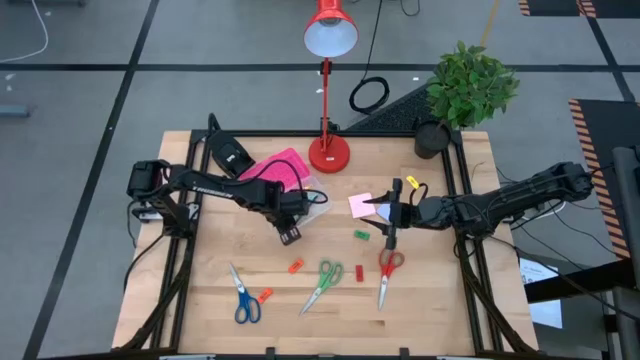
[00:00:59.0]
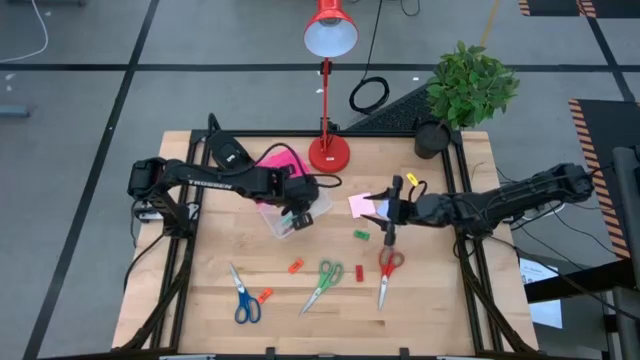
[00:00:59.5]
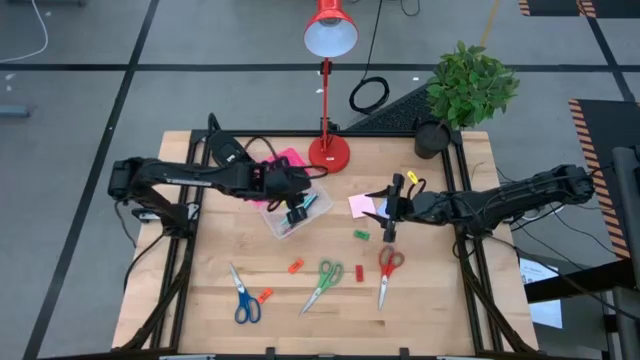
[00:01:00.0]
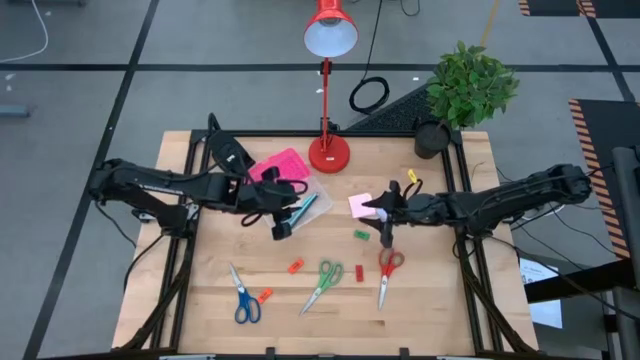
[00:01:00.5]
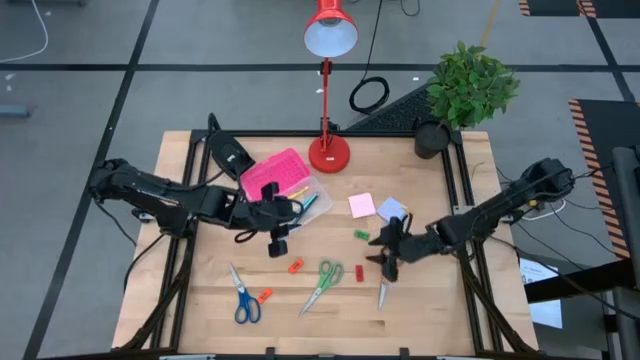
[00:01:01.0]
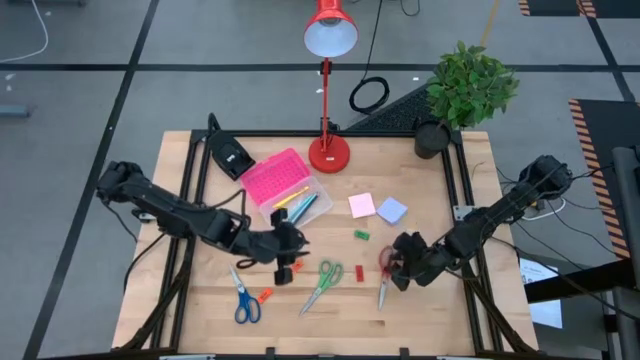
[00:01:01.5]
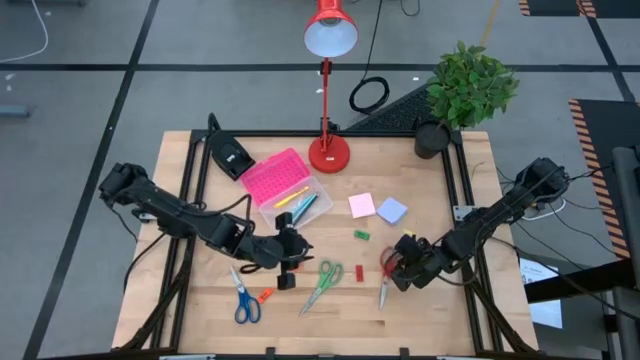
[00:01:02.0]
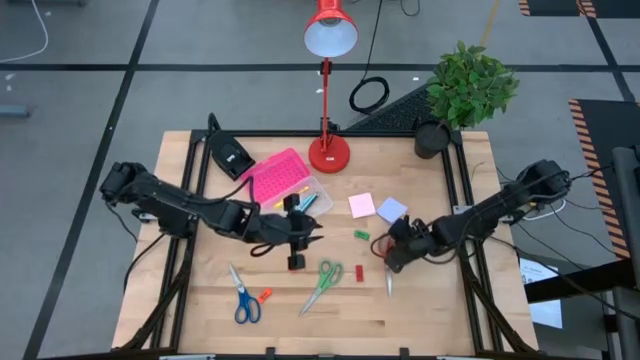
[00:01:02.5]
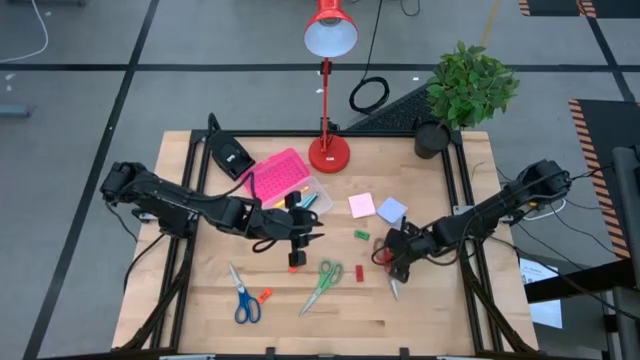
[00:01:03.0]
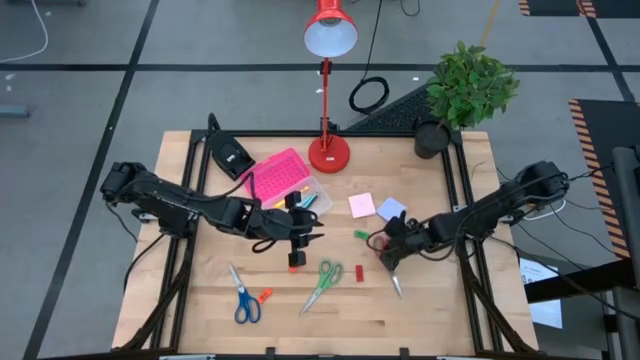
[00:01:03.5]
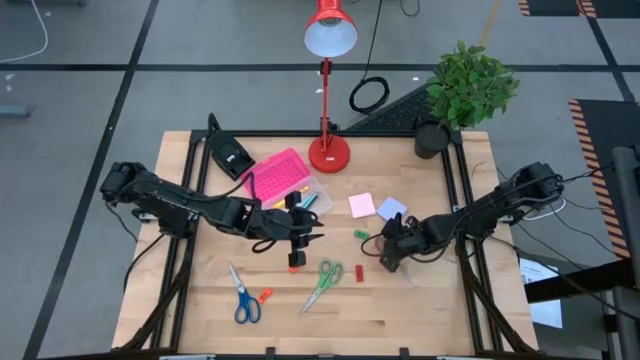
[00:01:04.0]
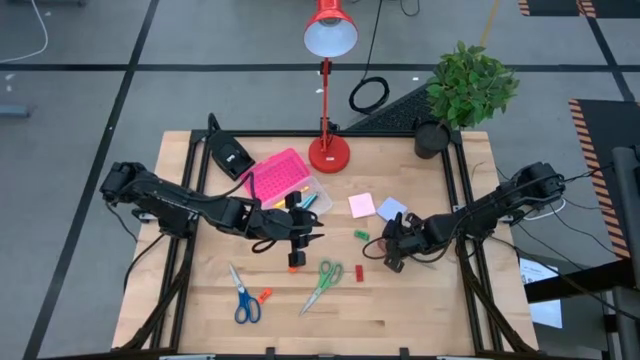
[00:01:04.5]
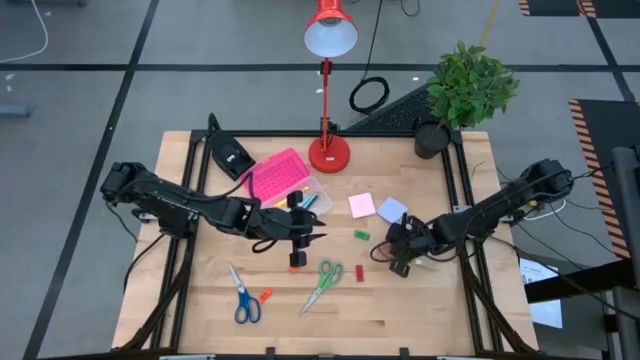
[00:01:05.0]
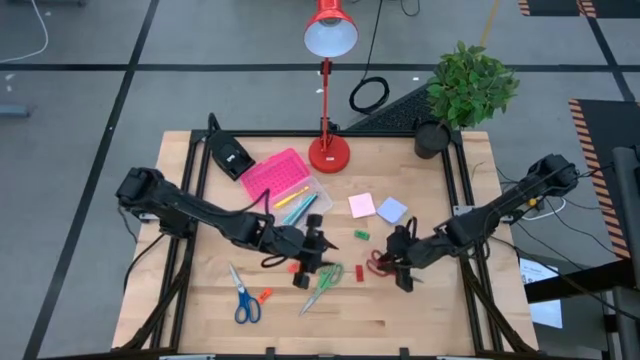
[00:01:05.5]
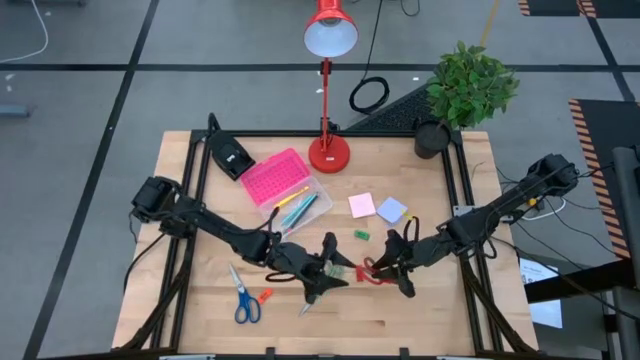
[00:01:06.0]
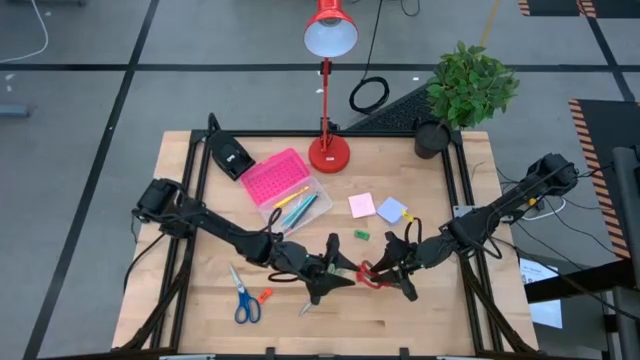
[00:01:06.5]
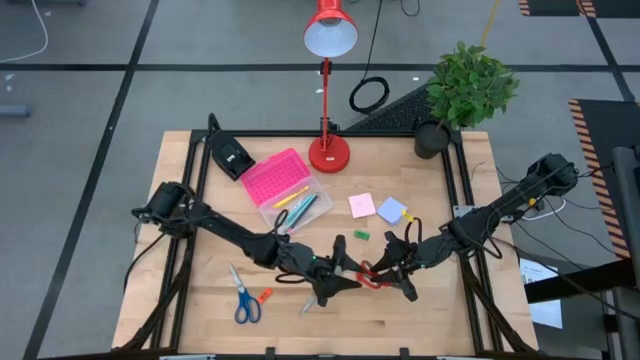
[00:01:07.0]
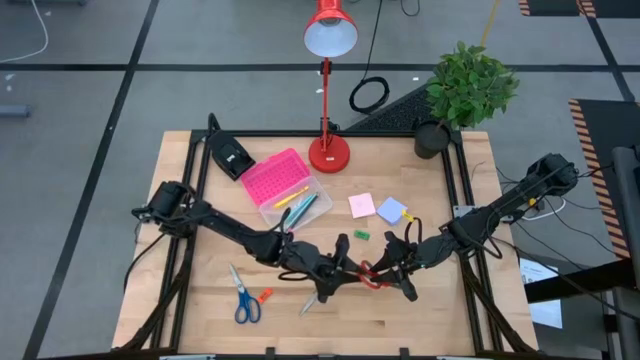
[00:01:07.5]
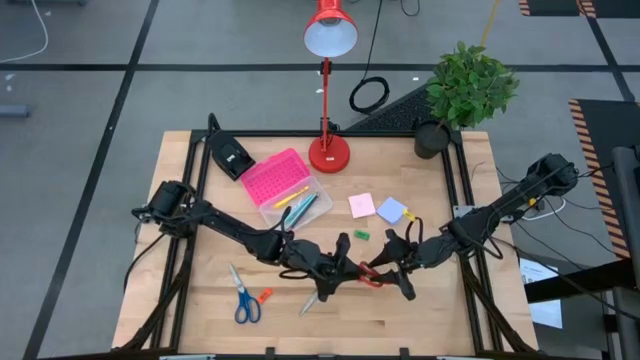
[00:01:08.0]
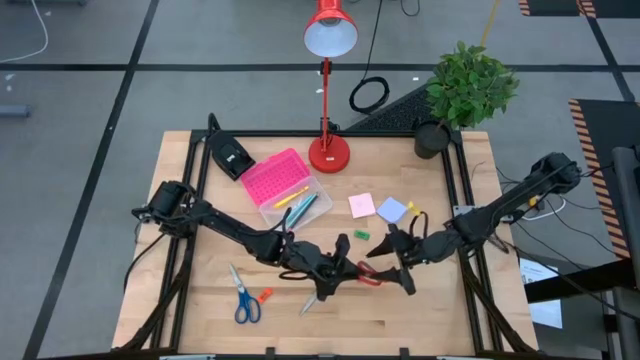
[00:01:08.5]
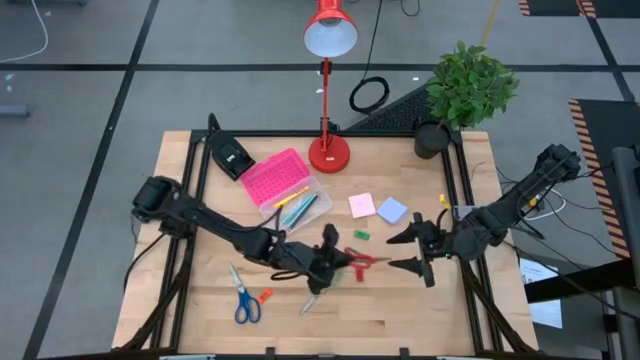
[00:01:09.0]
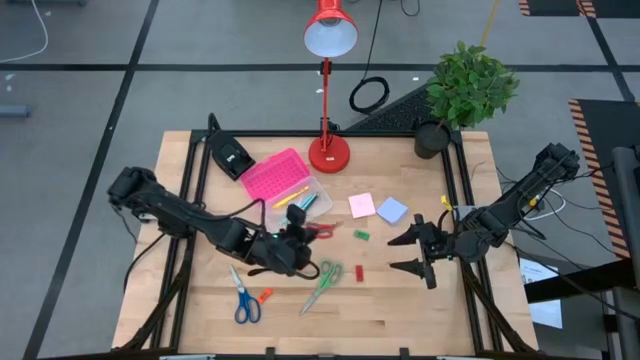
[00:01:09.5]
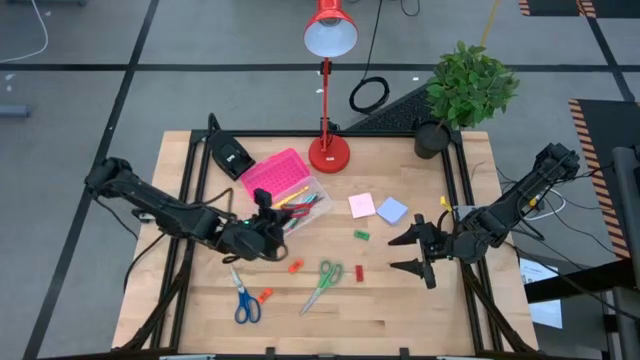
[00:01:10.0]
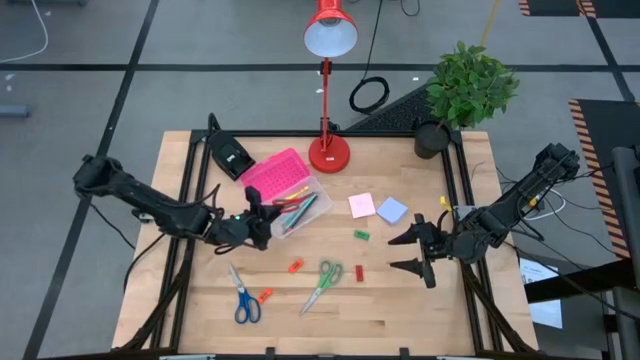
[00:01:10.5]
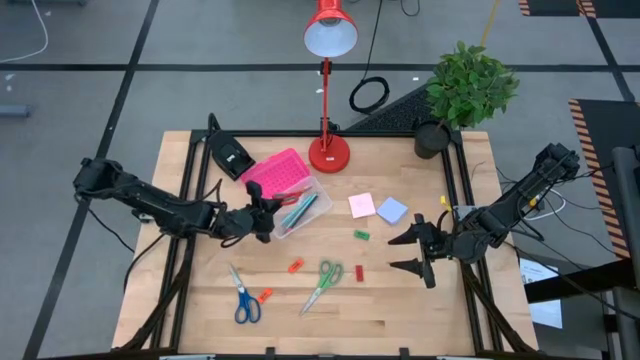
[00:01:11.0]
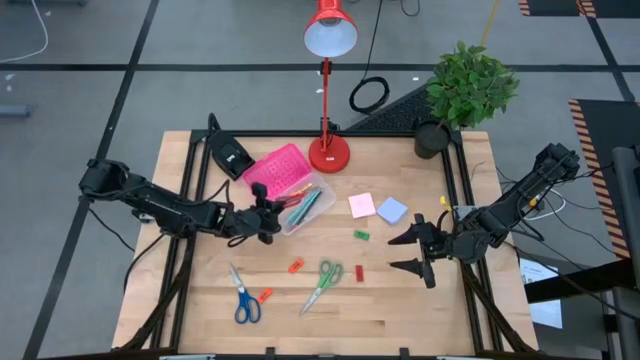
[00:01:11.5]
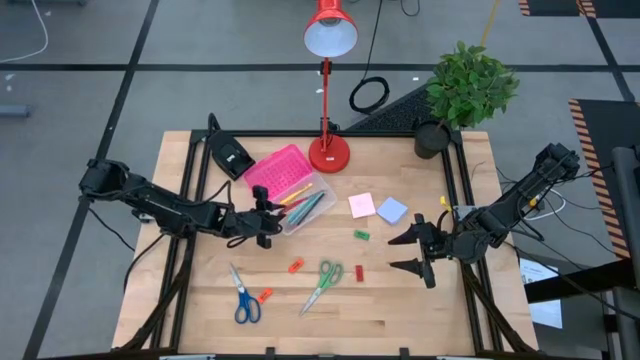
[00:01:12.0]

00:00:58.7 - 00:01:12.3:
Task: Pack school essentials
Put the red scissors into the pink supply box

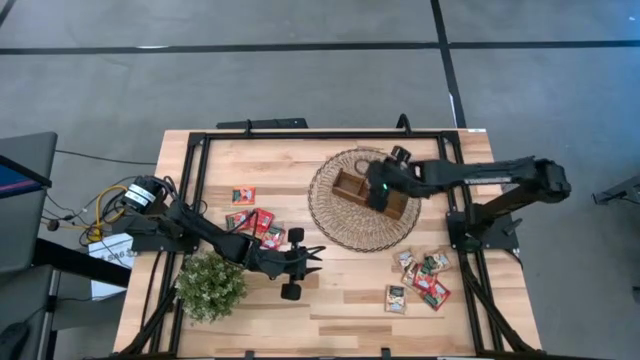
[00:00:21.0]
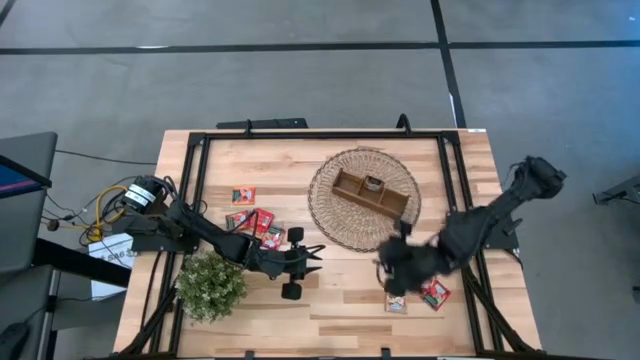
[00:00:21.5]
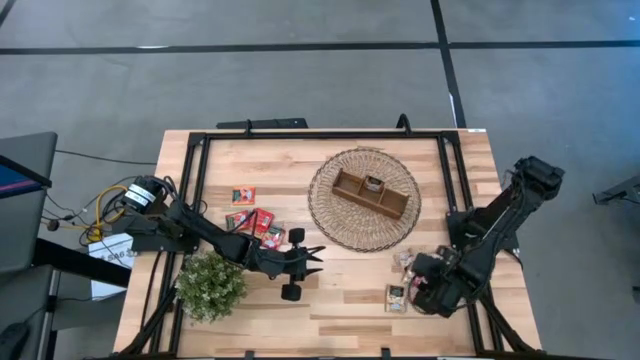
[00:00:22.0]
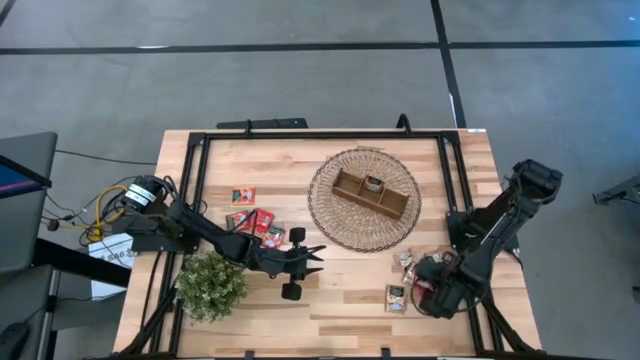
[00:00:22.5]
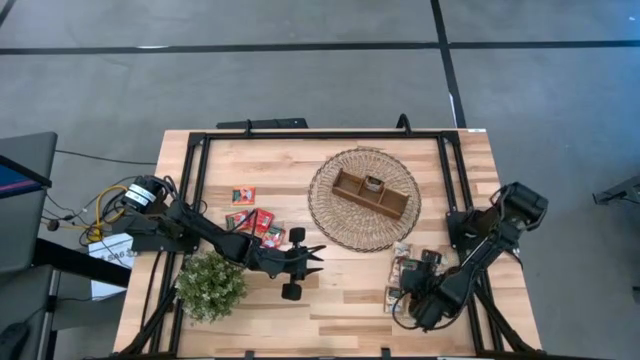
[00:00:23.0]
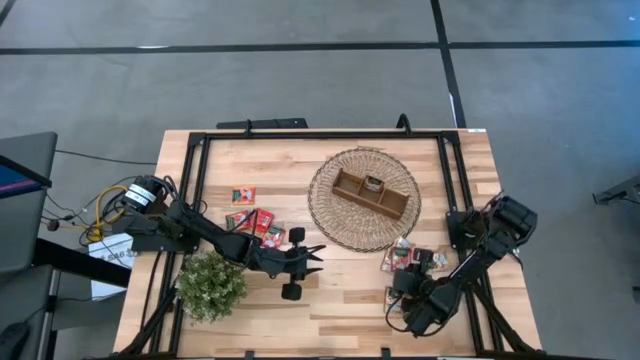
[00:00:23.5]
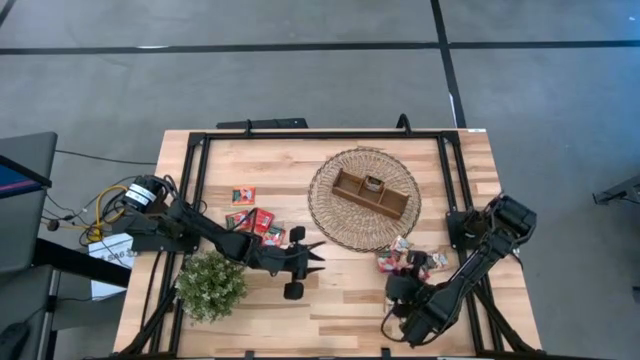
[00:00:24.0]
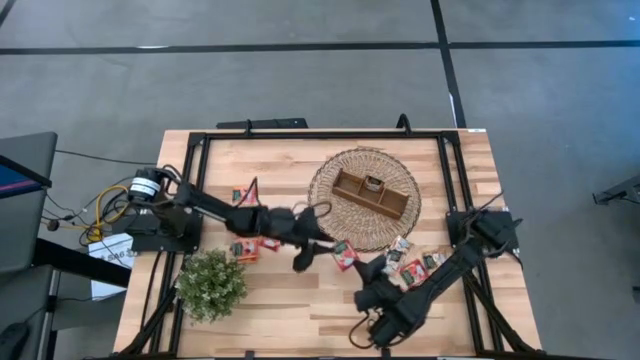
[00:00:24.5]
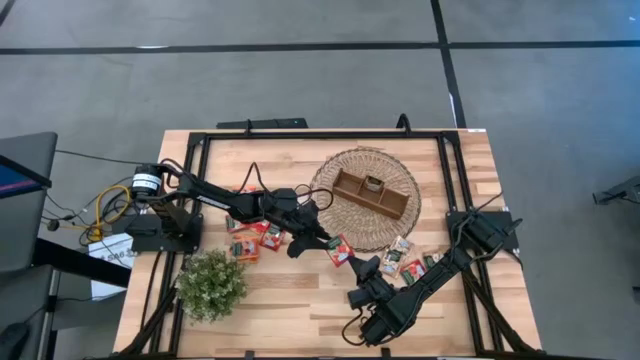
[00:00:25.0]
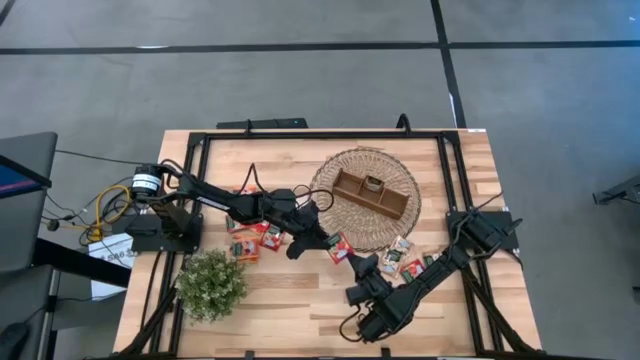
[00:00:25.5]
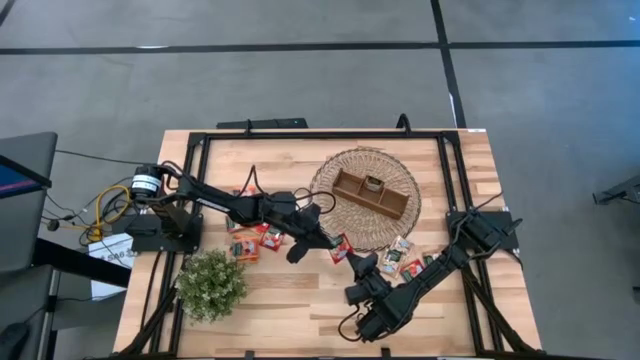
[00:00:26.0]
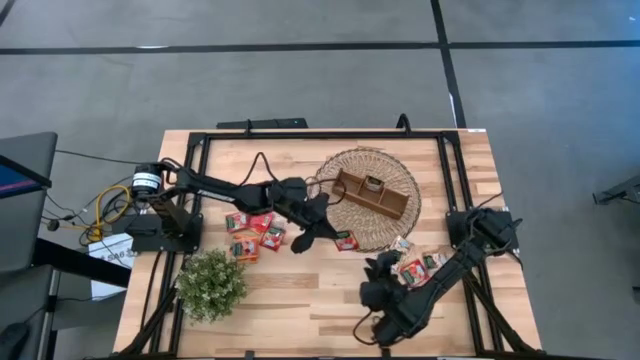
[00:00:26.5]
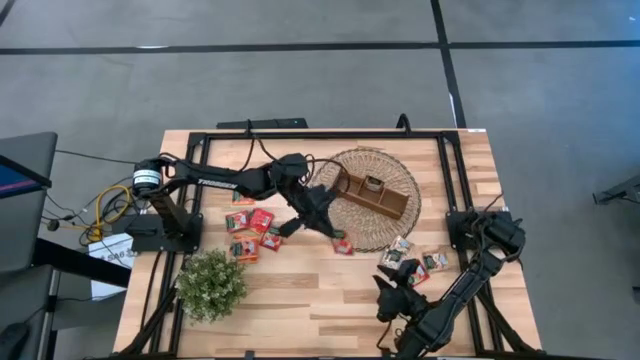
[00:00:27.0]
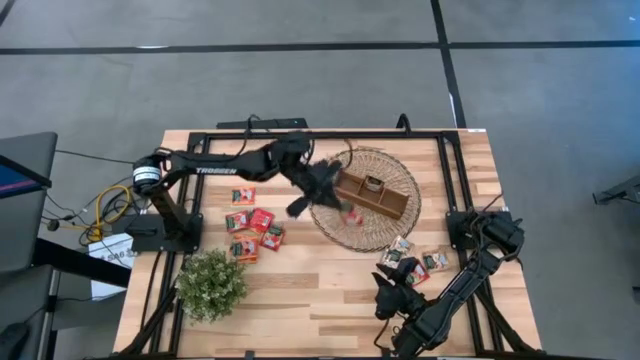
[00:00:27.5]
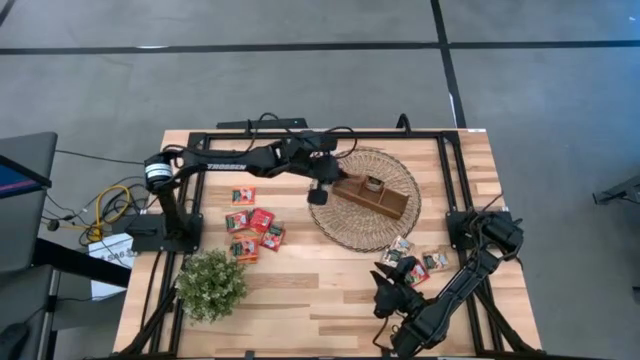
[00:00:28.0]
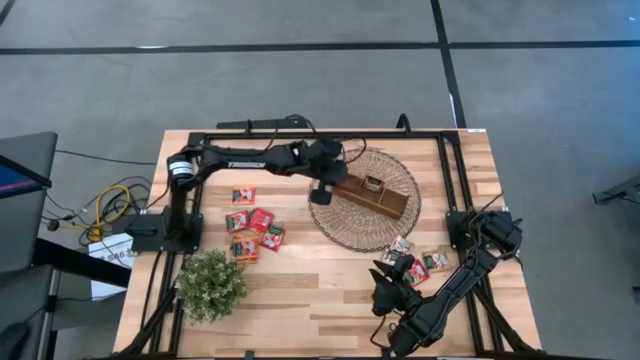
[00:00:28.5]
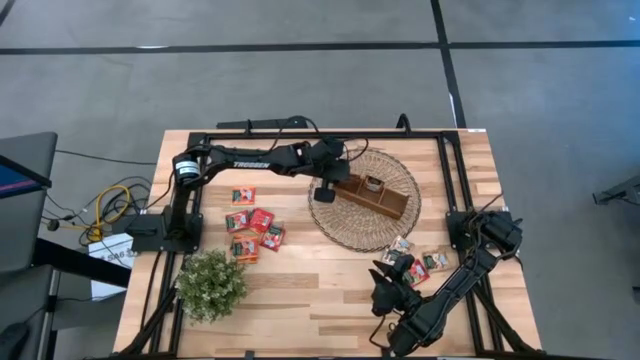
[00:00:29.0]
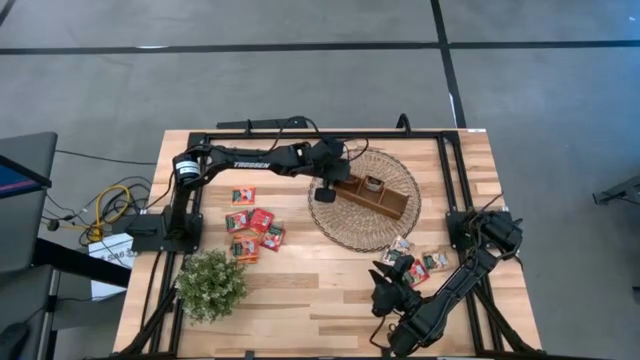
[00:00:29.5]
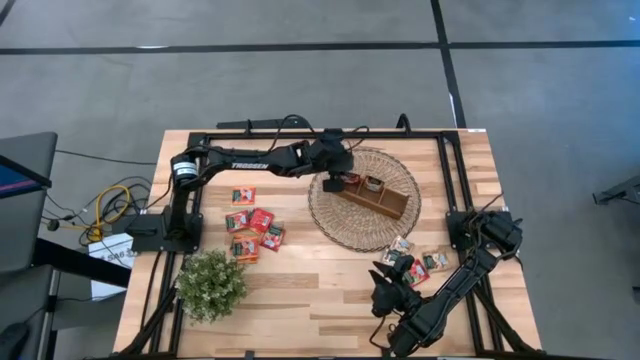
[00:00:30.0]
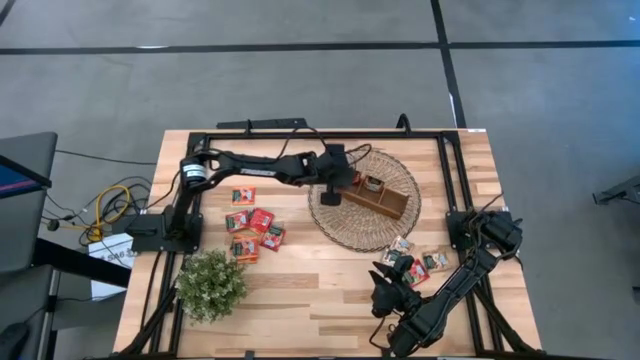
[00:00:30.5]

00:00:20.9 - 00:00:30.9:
Task: Pick & Place Tea
Put the red tea bag into the left section of the wooden organizer
